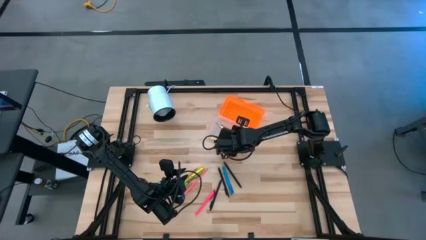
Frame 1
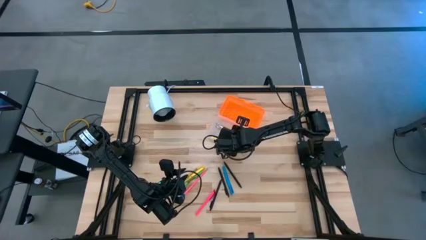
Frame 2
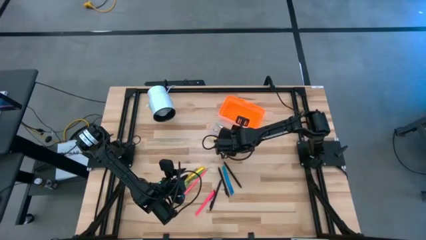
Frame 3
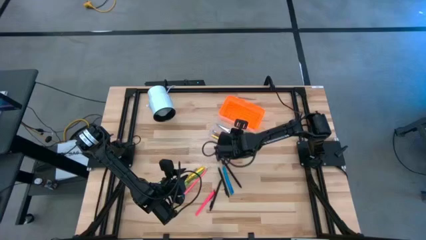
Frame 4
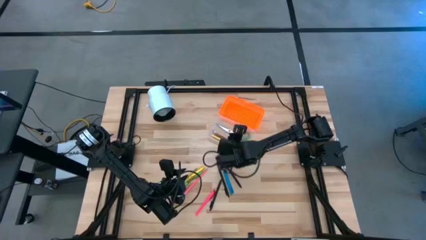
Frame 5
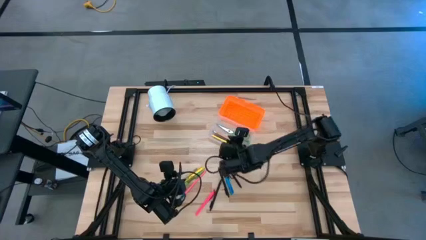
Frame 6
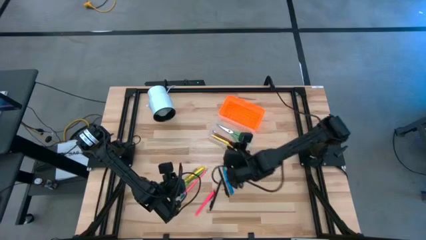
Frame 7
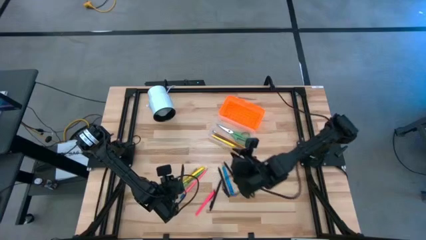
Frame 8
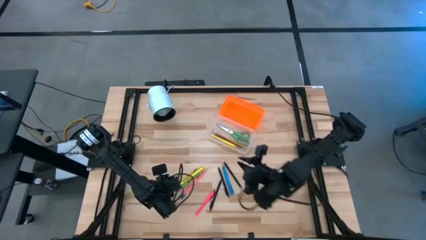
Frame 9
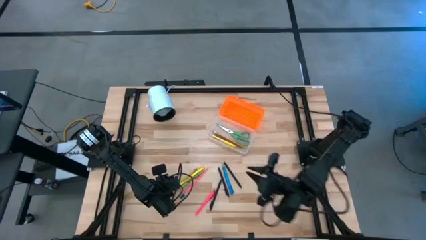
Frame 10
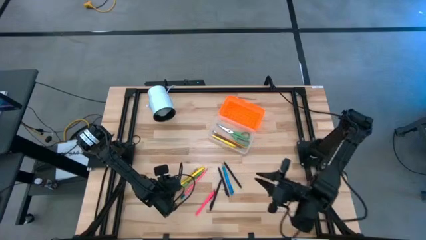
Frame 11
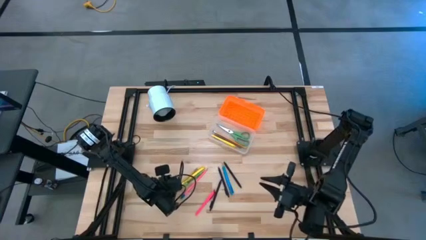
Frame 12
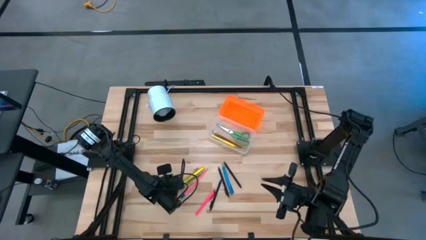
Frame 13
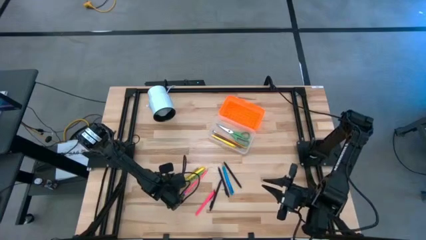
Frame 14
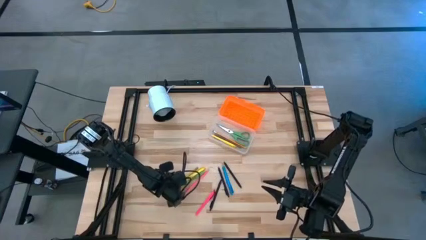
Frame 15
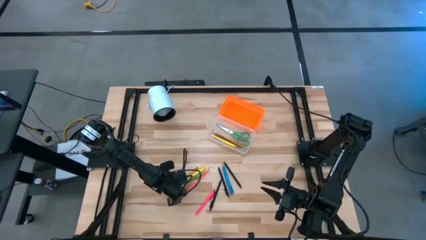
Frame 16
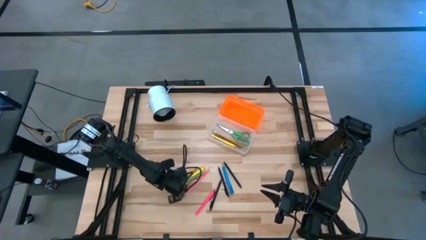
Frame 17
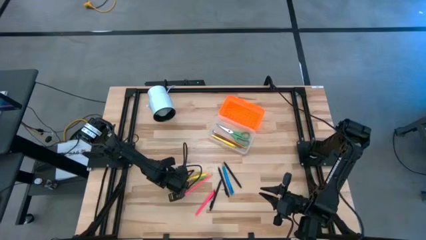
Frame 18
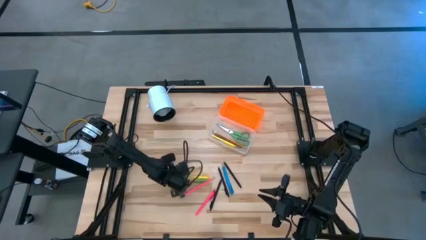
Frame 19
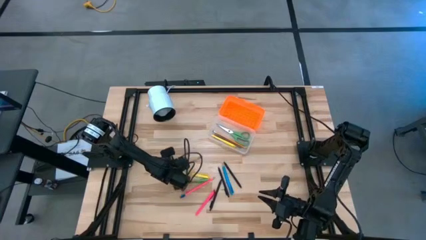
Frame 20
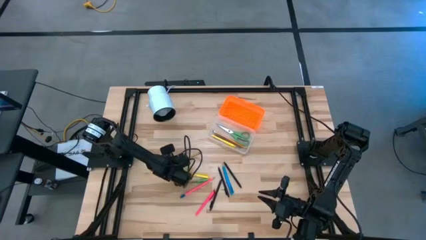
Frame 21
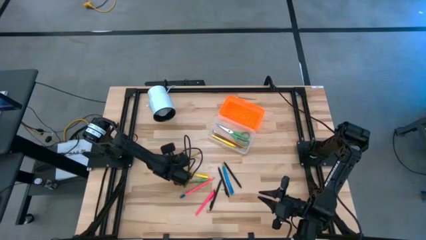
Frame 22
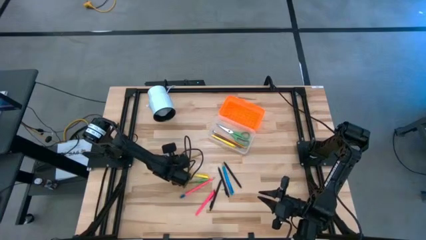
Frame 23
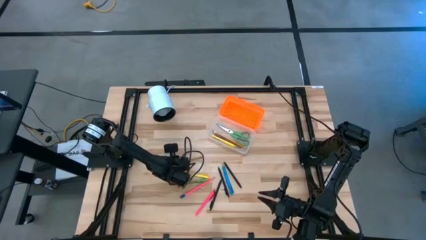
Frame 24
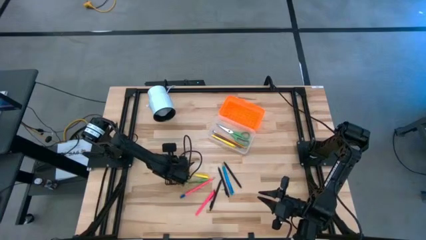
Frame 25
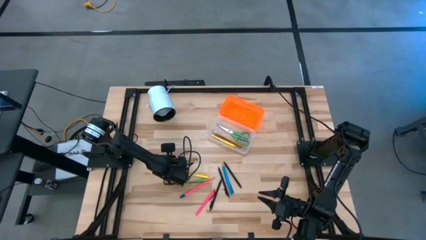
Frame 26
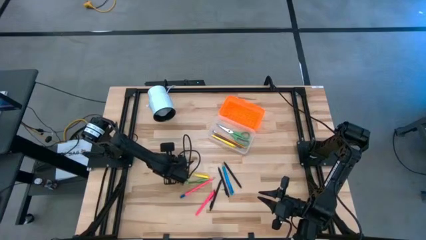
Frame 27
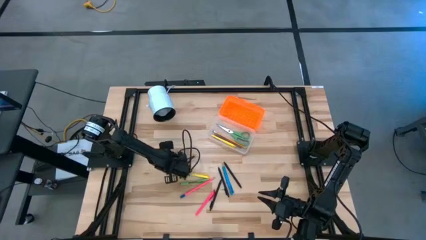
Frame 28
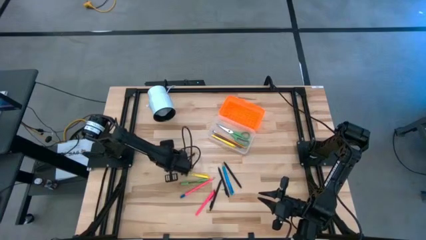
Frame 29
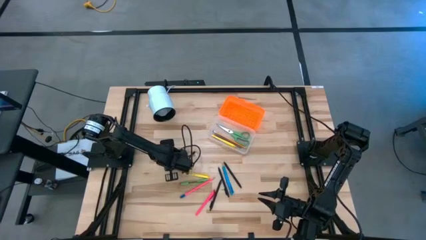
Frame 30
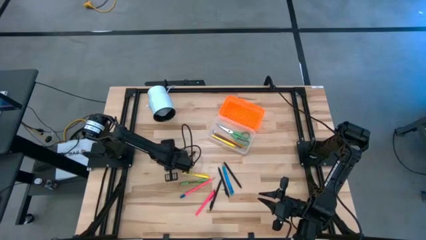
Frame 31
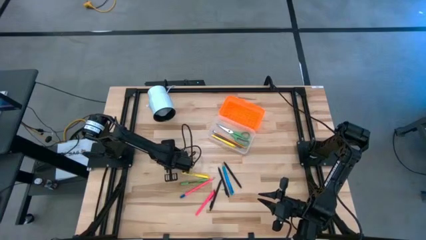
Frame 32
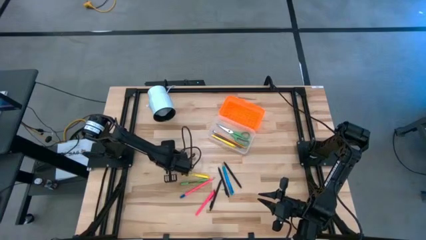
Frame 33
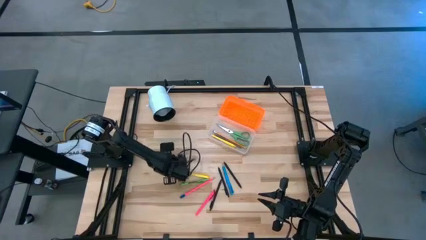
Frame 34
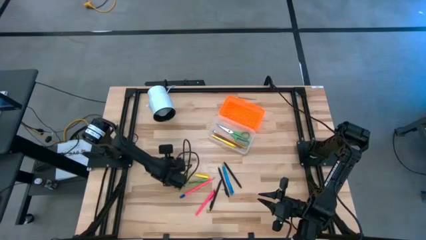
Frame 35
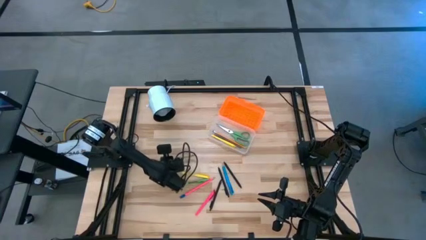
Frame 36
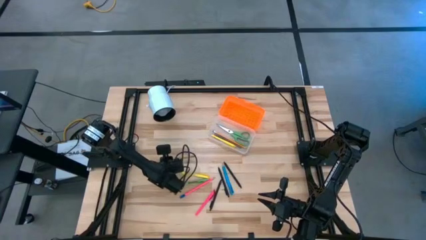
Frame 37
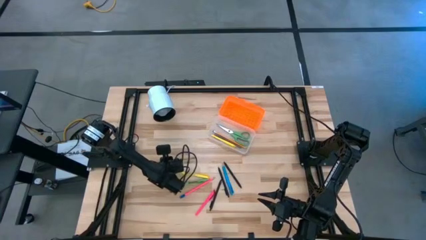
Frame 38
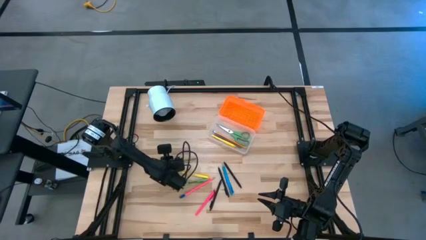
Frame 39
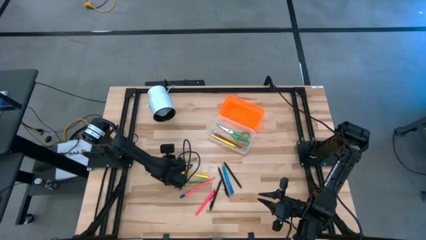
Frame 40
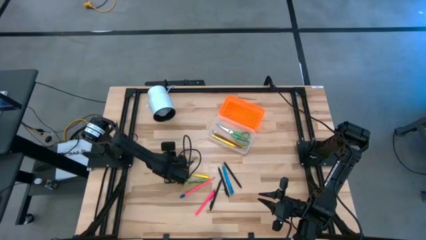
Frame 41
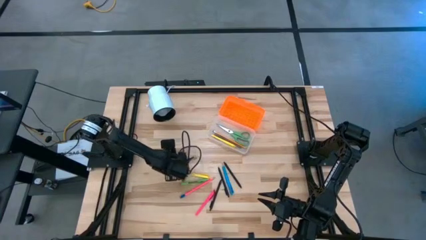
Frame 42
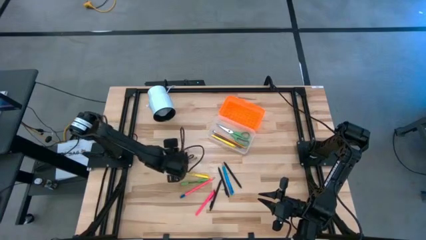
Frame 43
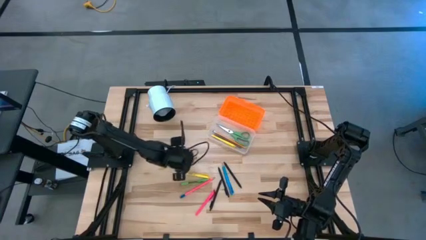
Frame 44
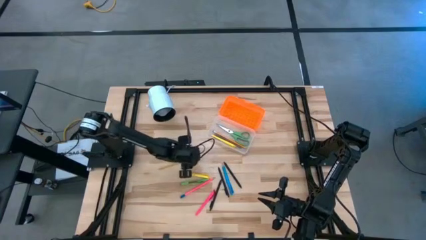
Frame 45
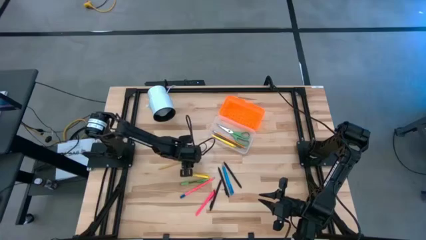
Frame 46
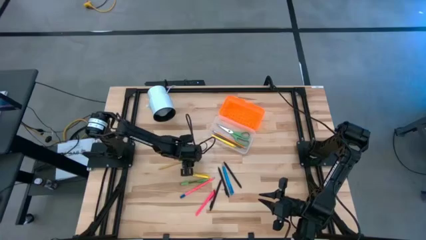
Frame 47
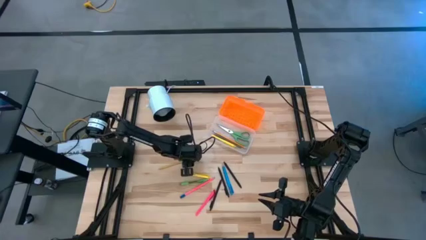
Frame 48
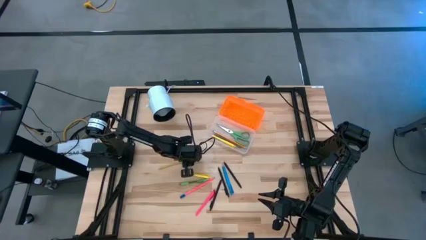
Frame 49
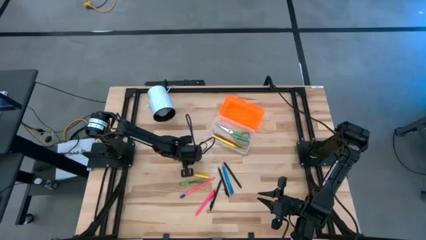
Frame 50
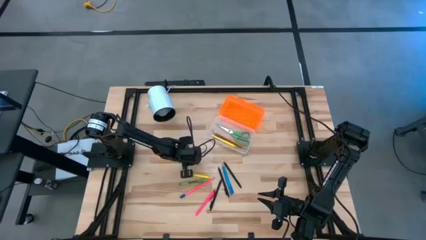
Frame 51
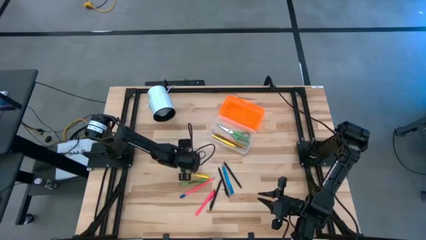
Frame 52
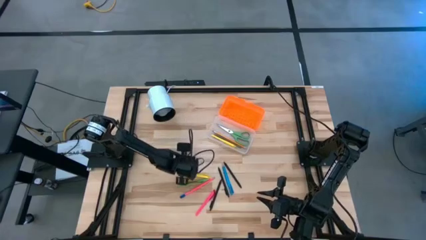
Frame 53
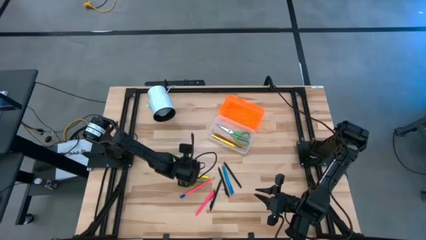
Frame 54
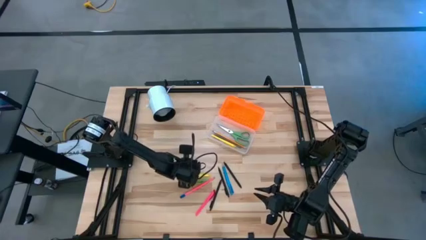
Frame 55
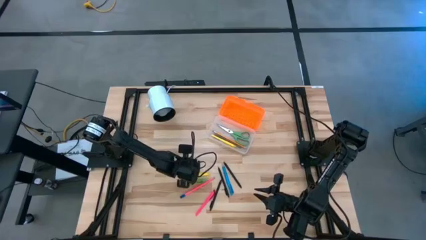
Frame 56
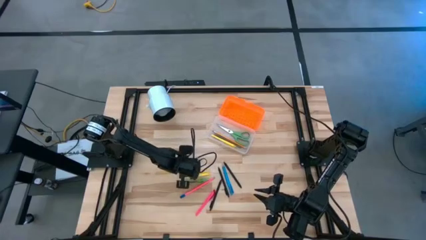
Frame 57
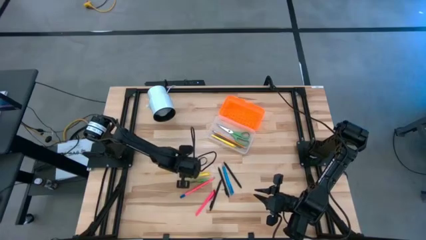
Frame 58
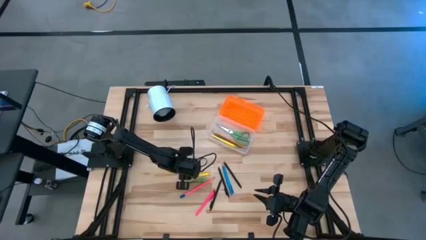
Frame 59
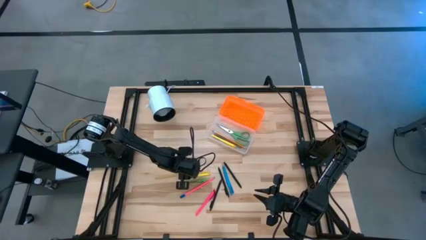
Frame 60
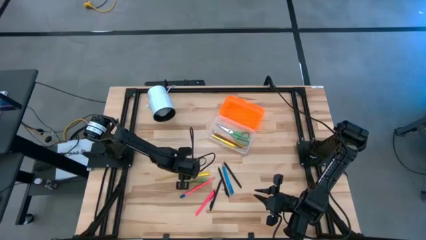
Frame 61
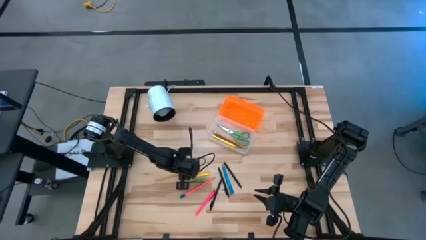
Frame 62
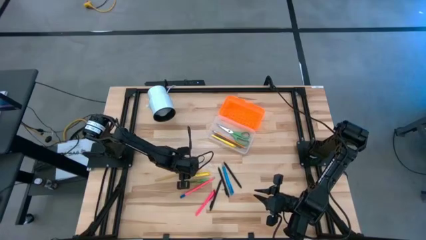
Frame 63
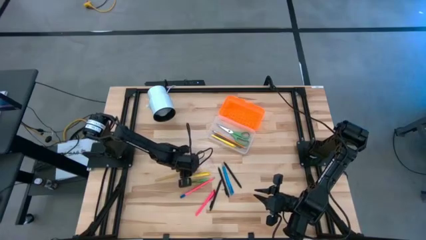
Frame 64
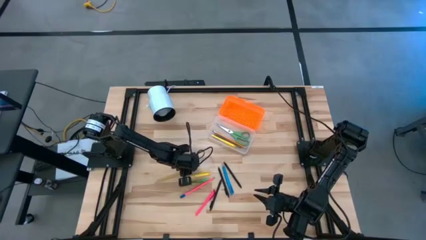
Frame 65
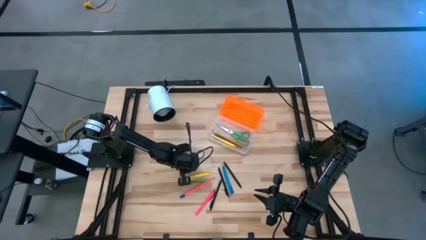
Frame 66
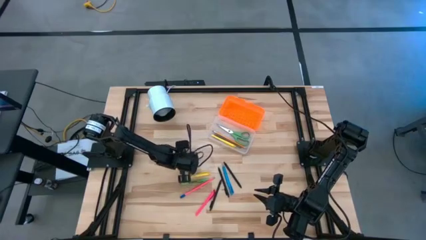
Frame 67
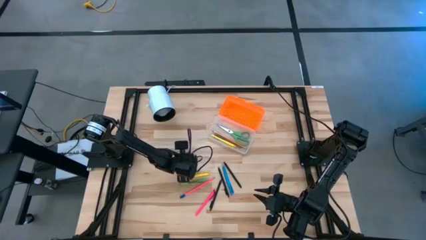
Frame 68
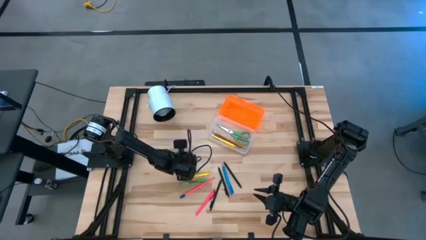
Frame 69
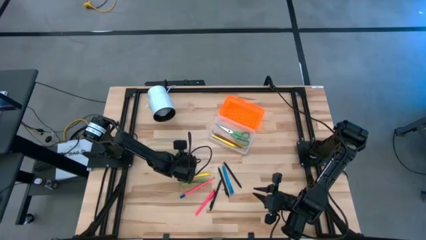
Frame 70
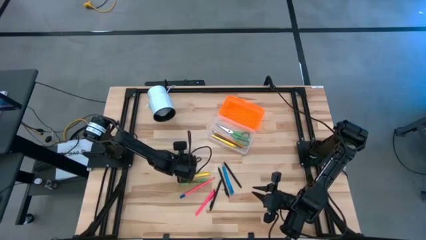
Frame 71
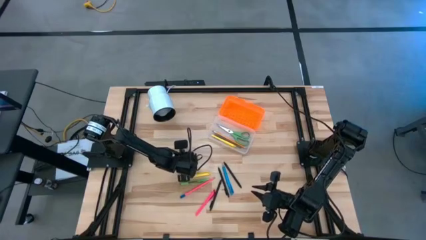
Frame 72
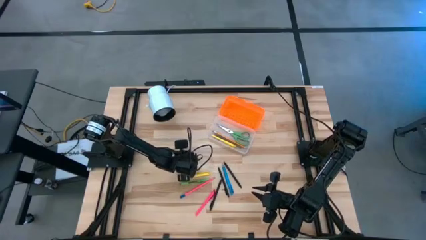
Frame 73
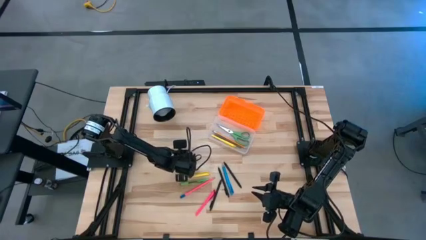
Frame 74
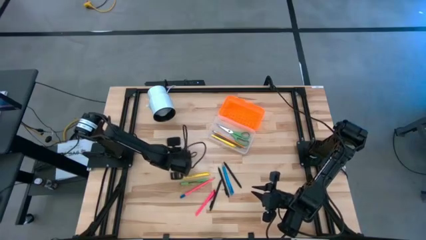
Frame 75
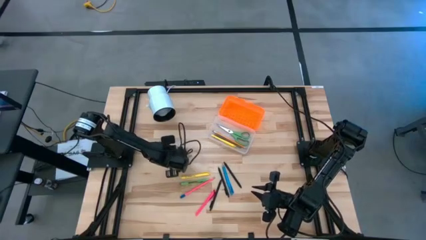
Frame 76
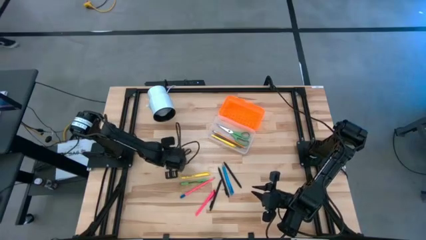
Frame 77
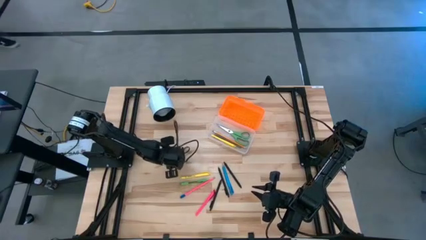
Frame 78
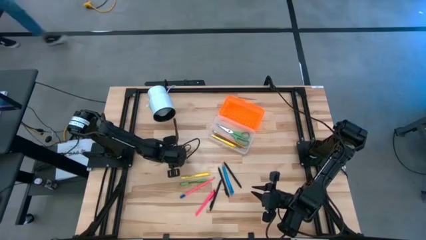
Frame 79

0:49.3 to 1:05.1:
Task: Pick & place school supplies into a supply box
Put the yellow pencil into the supply box
